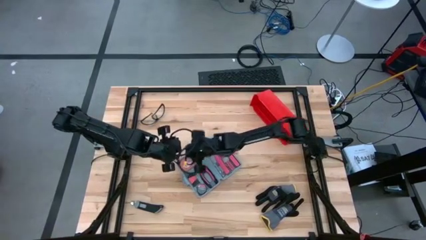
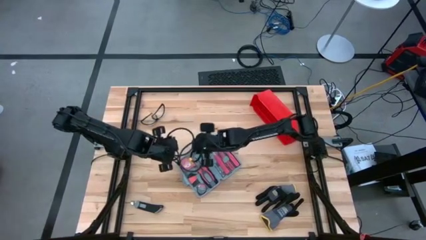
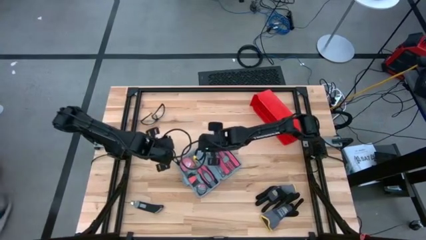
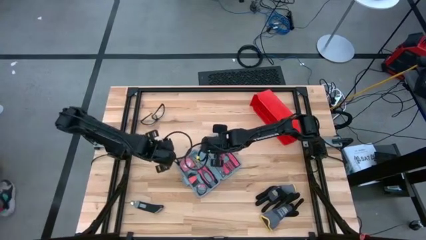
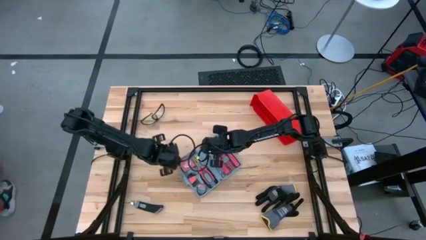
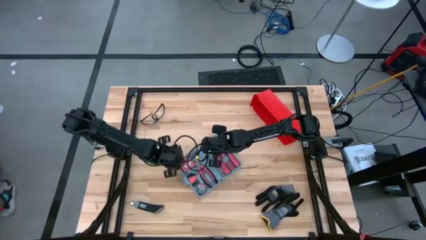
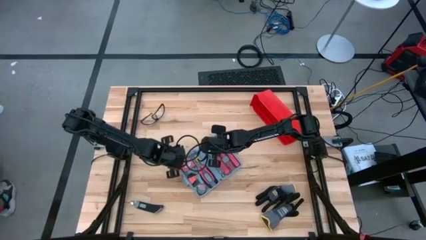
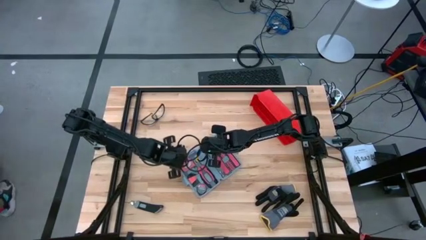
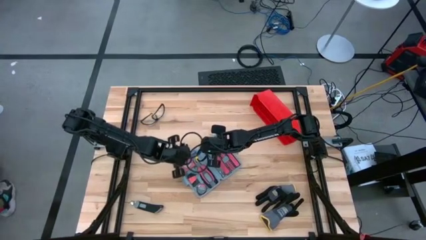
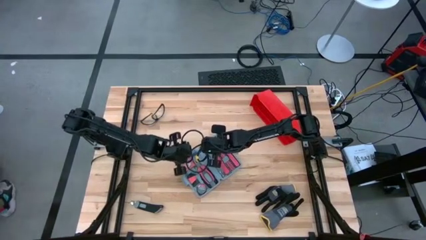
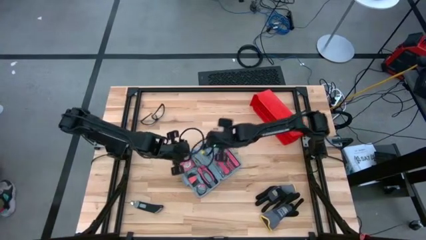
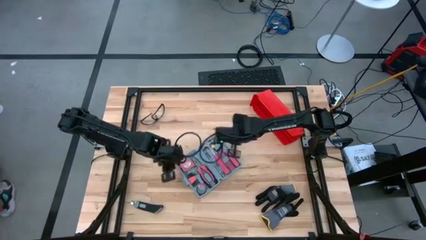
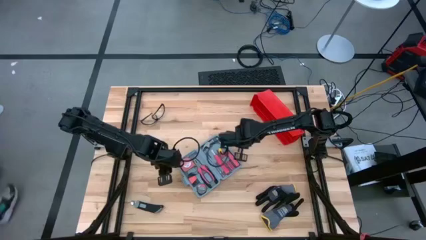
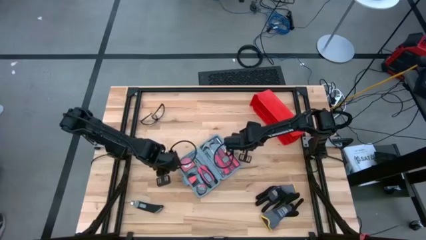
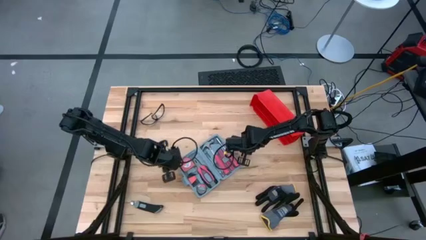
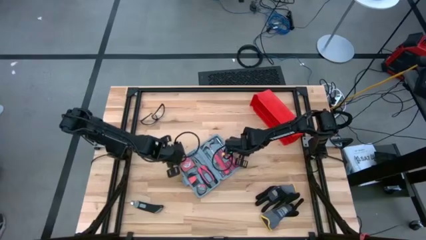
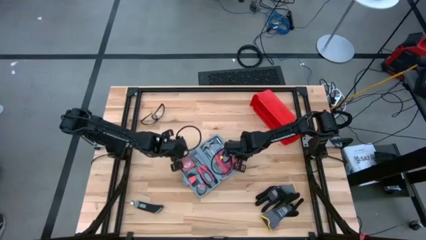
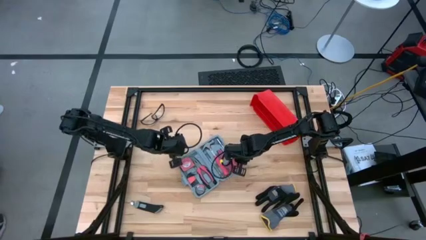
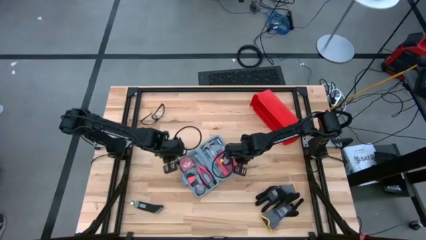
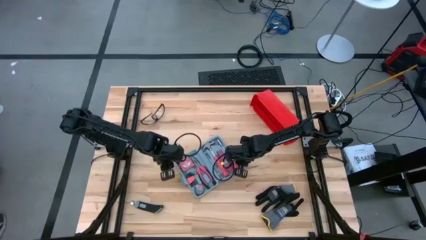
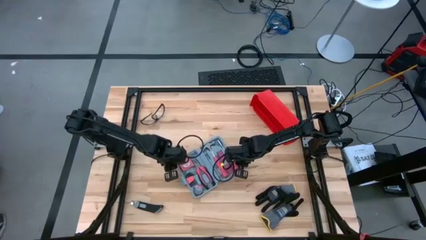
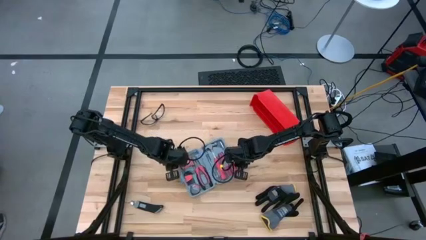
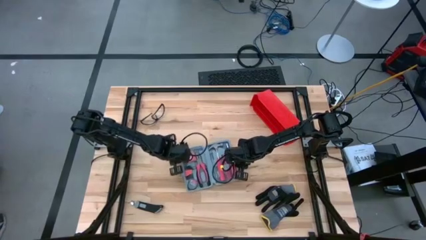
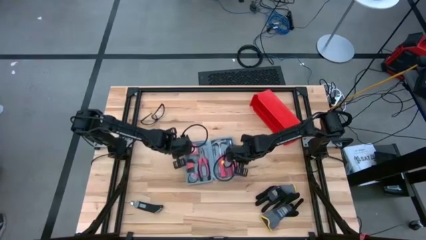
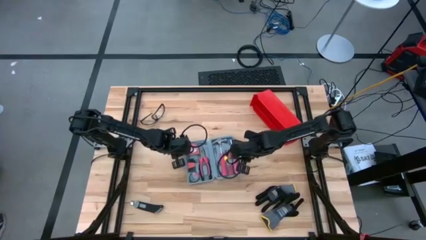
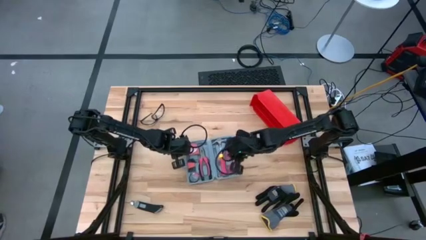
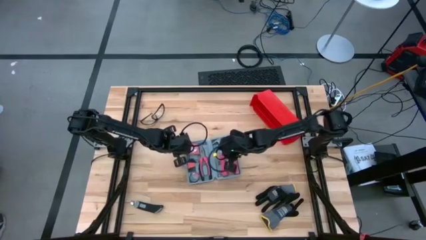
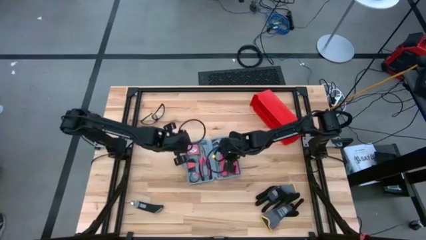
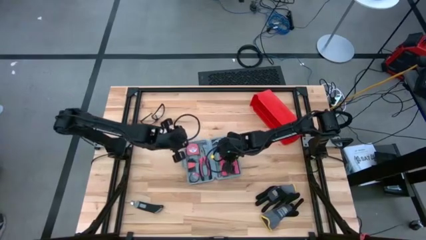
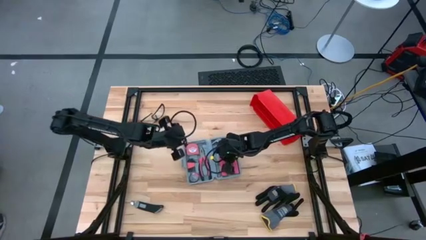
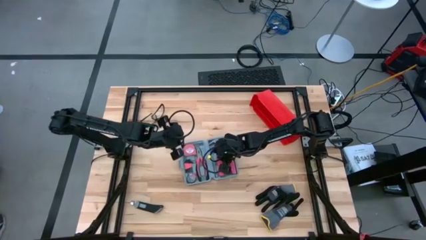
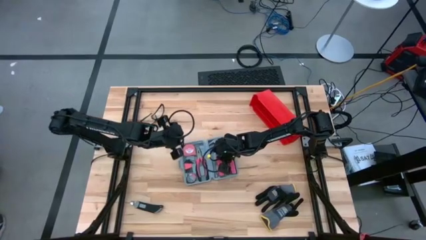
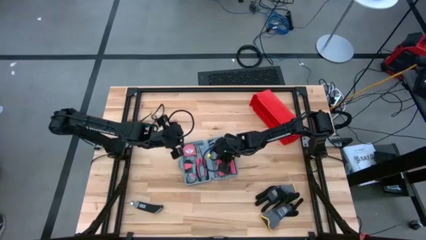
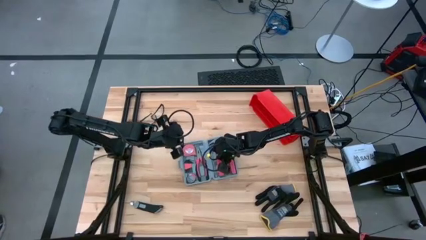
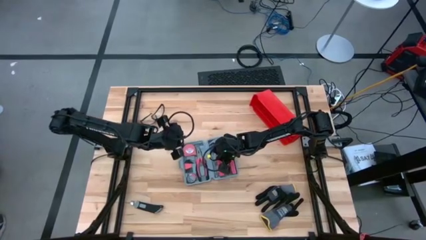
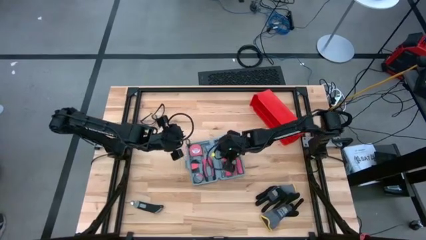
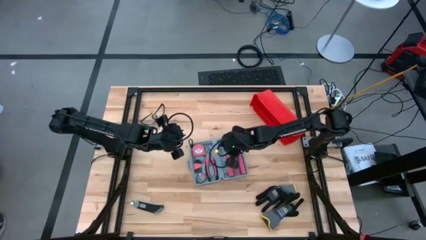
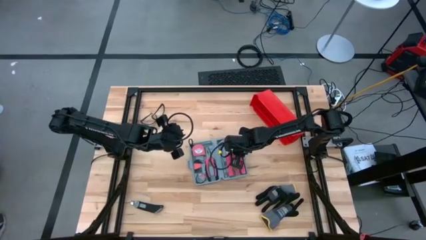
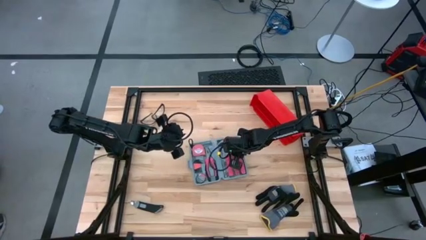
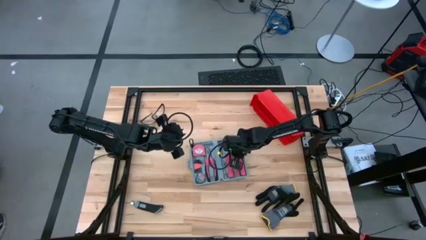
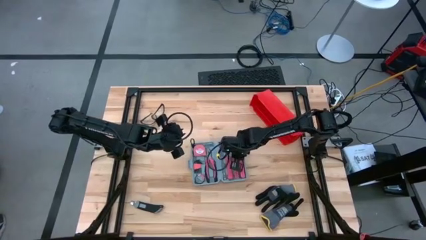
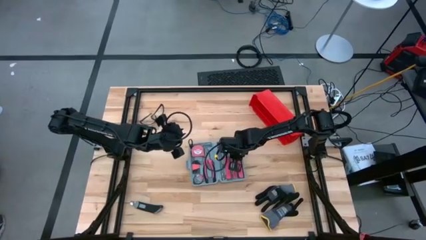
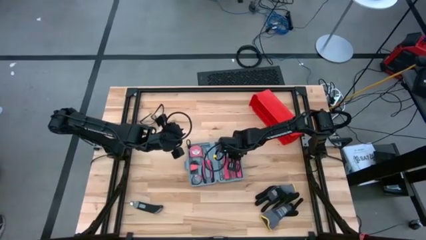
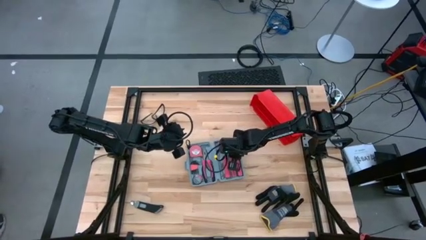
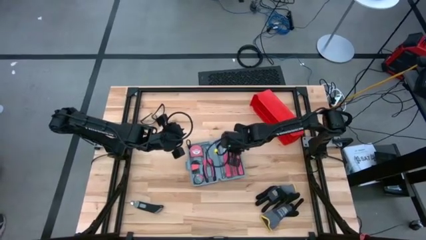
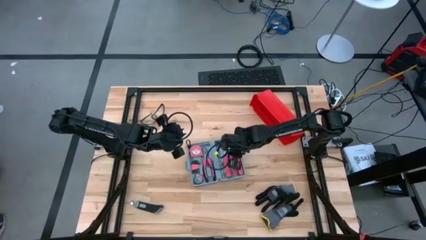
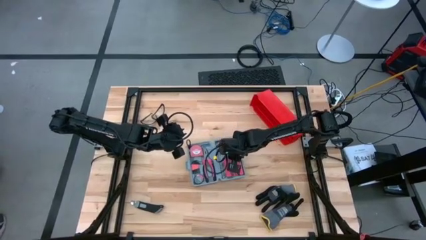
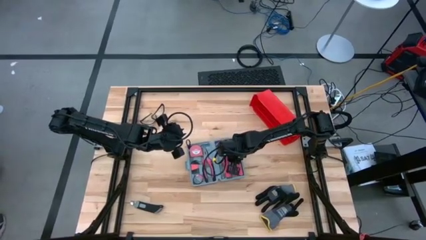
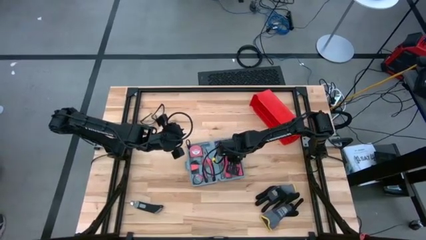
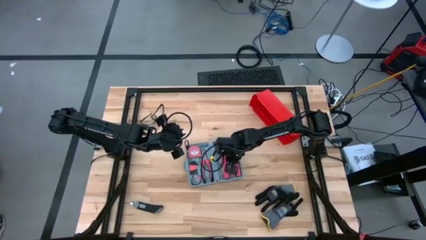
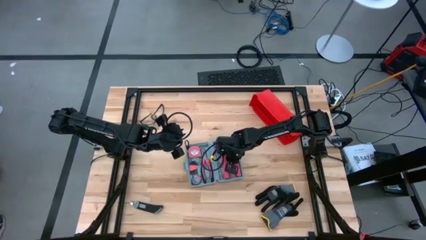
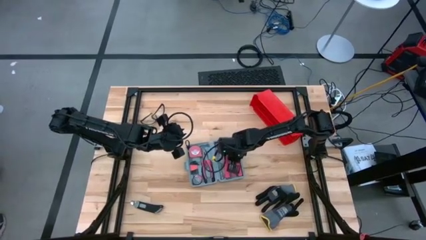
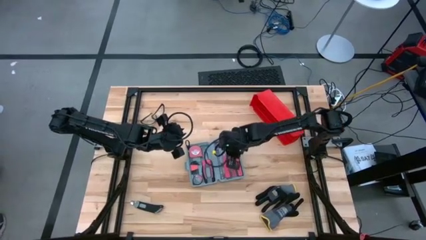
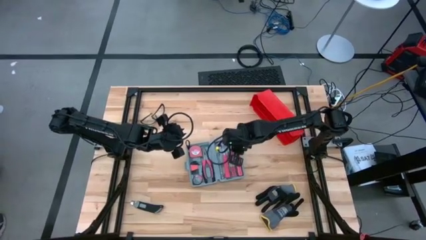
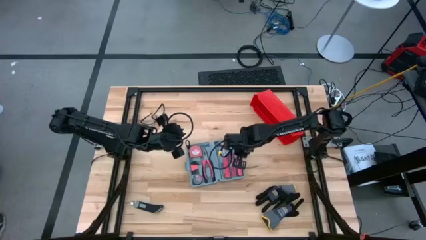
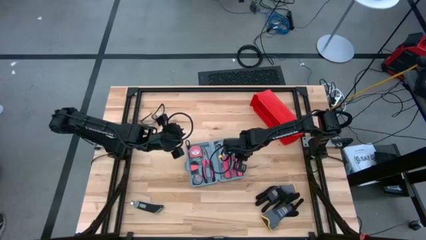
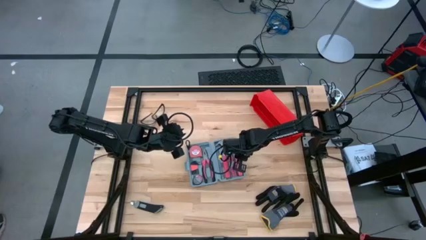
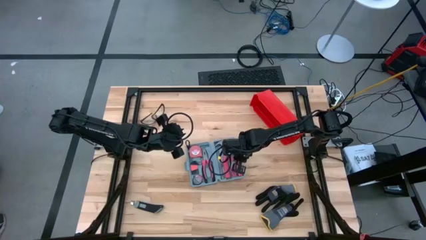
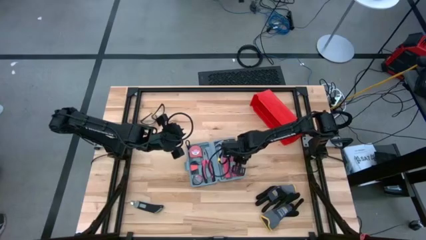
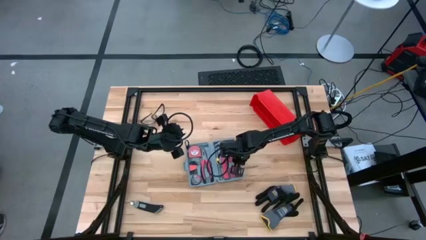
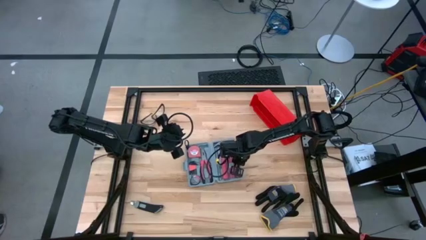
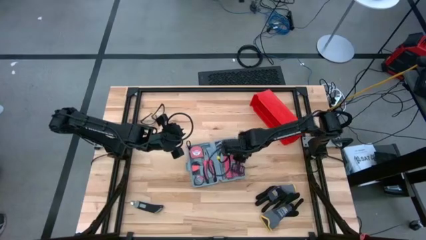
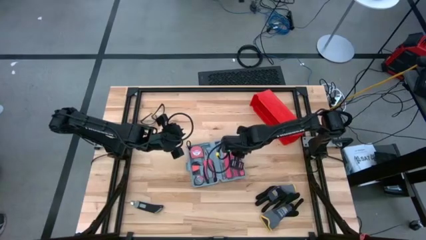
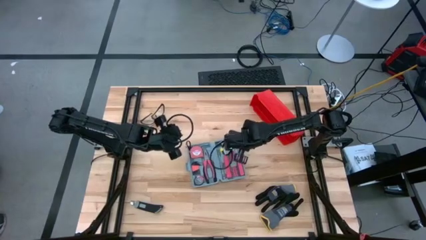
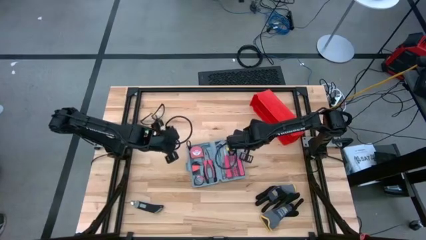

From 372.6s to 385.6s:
Task: prefit tool cases
Adjust tools inside the tool box

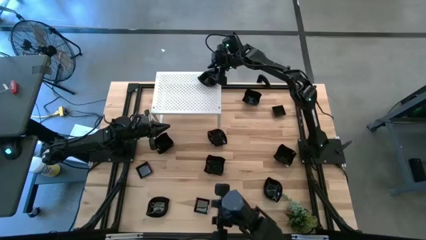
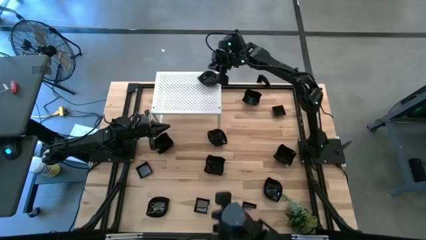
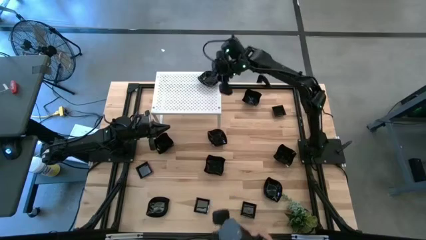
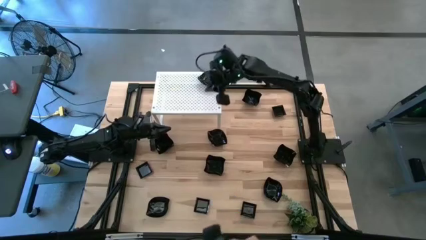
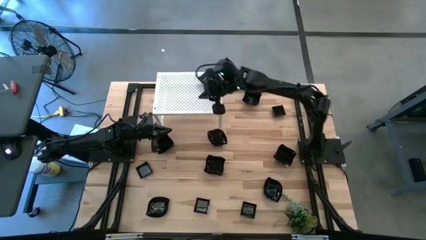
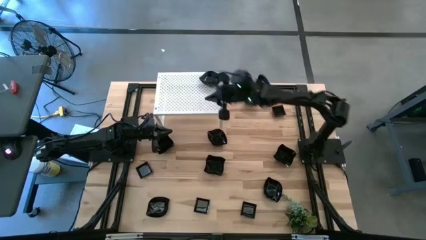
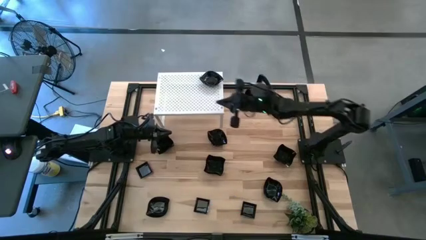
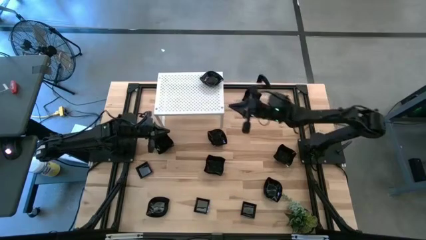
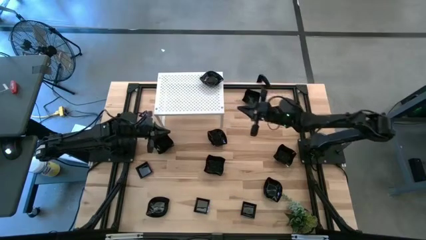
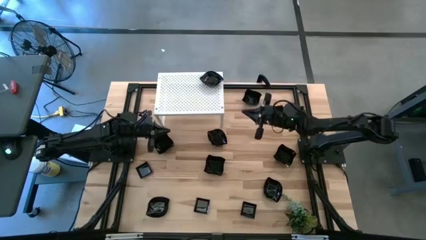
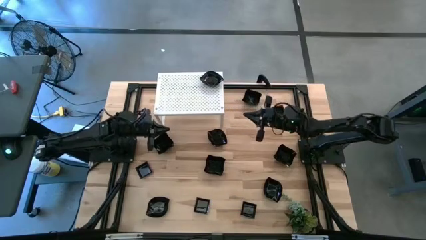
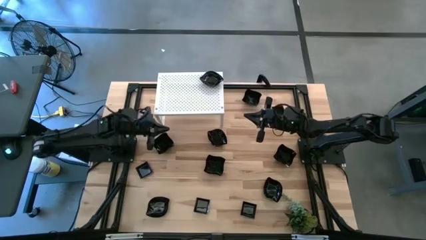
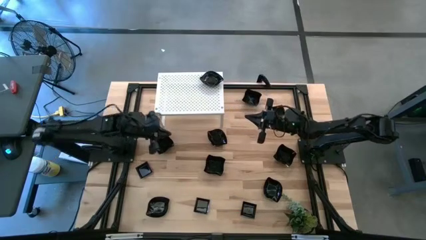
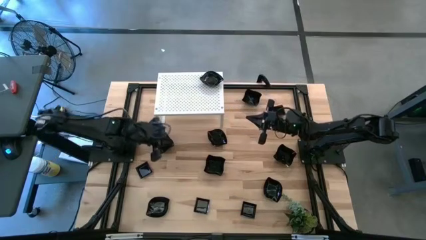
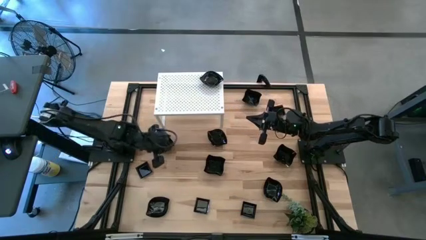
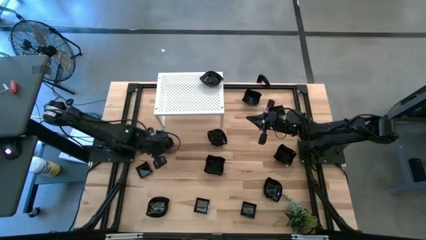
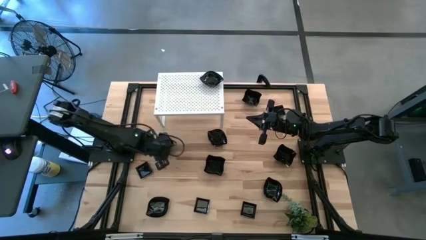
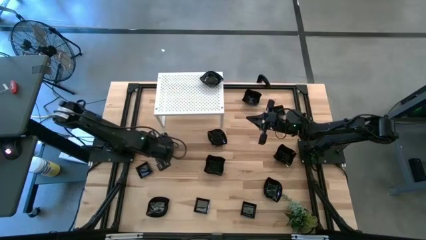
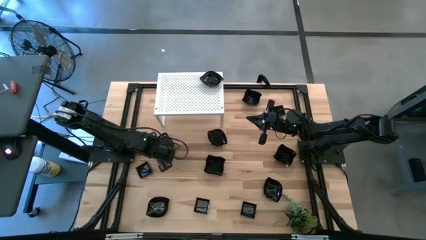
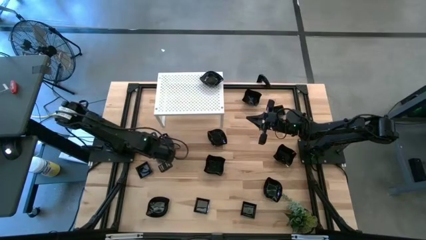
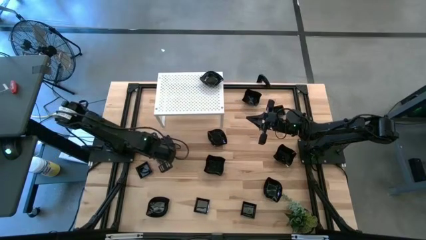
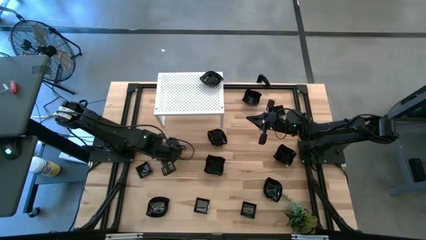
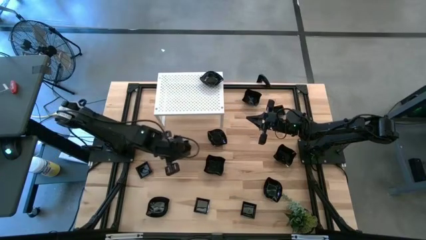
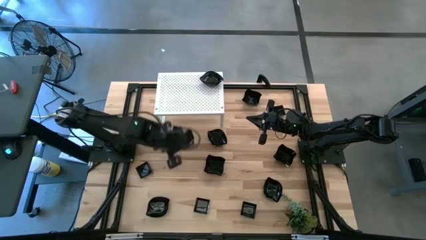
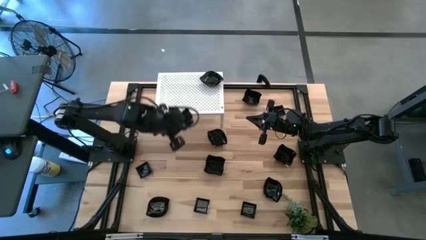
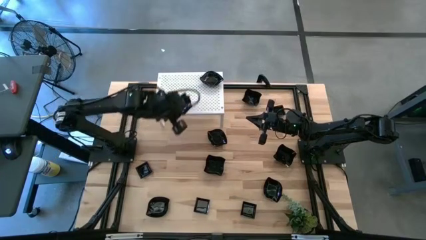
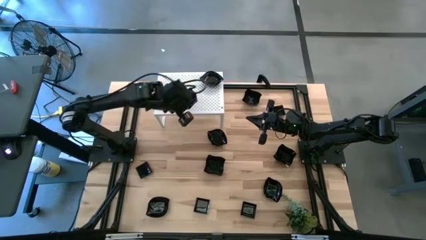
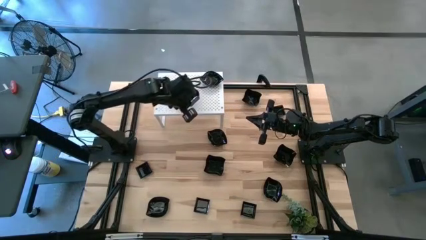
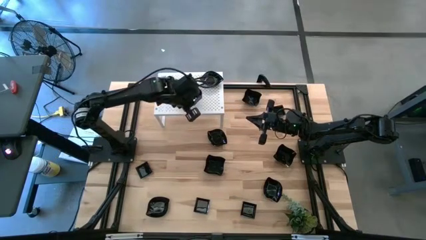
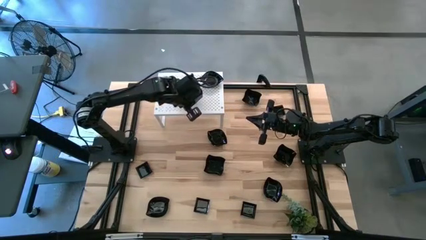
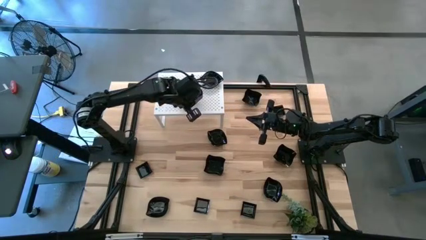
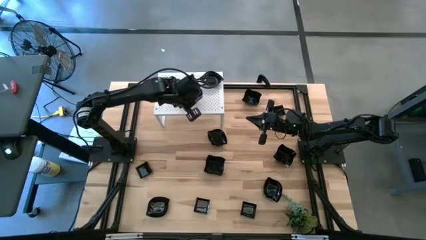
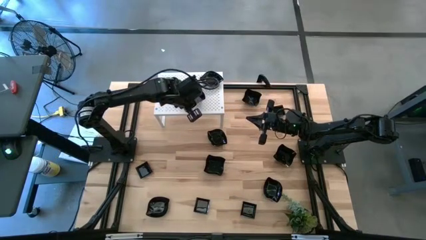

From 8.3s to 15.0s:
Task: Pick & Place Mini shaped plates
Put the black distorted square plate on the shelf
